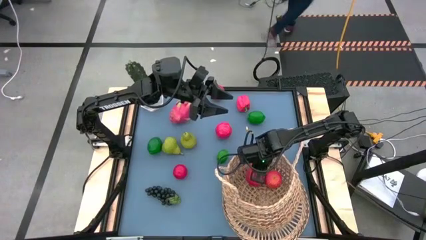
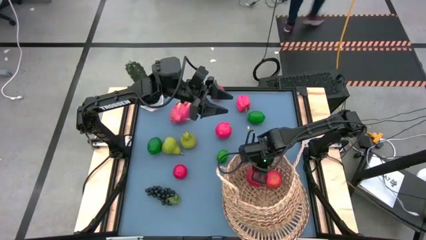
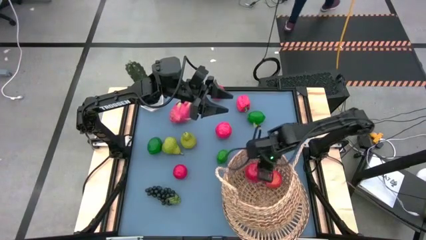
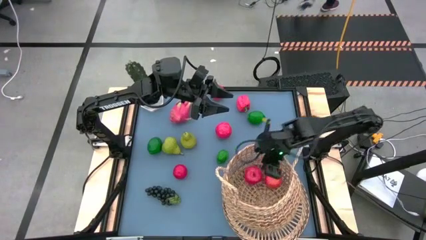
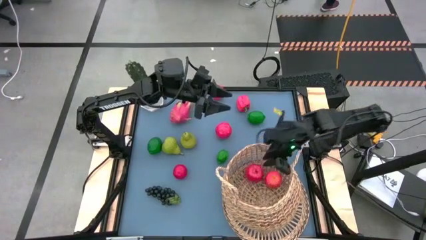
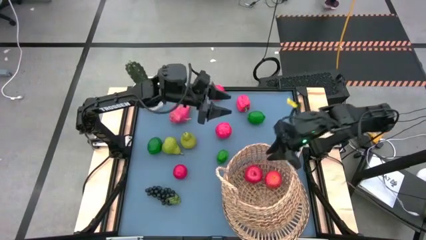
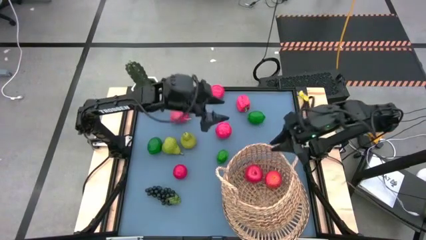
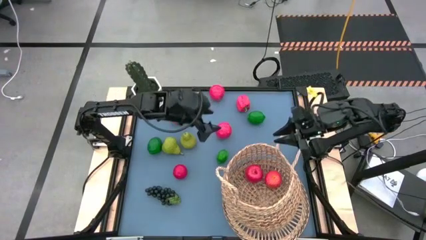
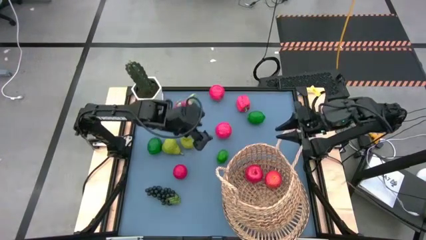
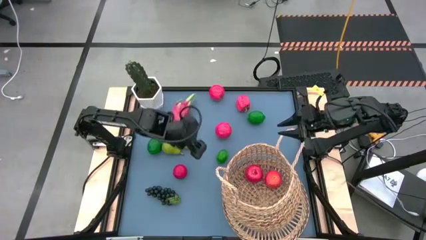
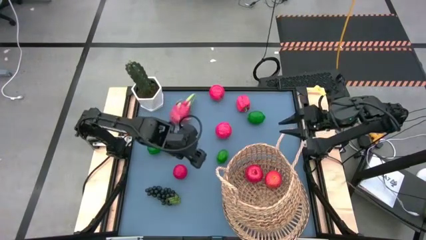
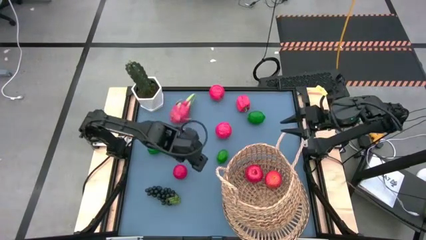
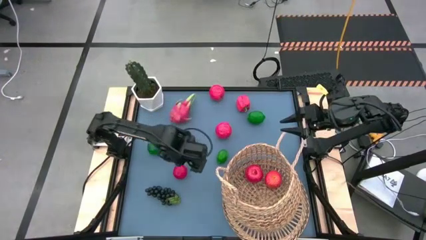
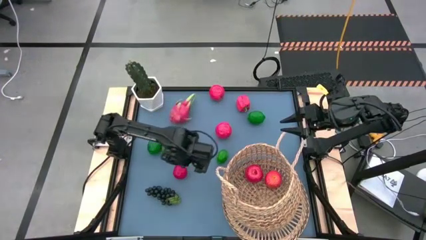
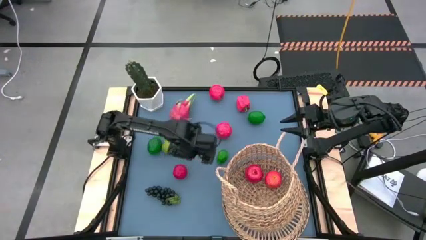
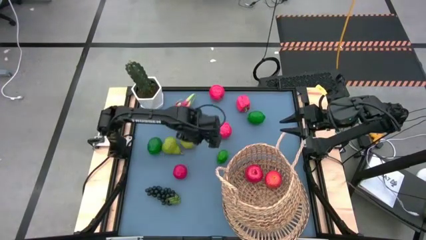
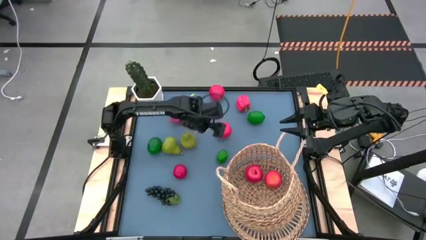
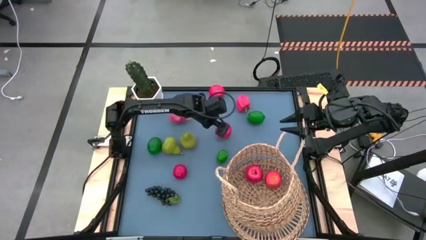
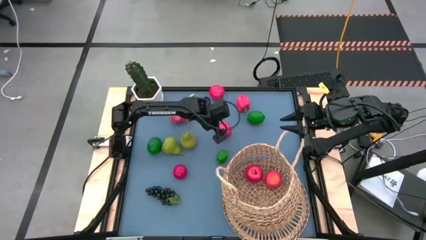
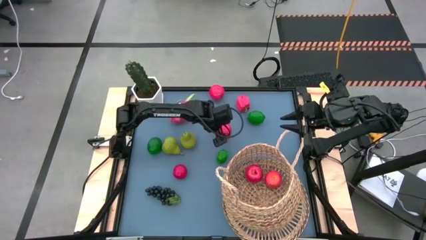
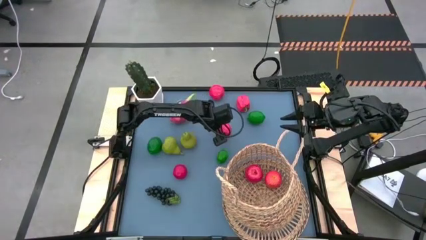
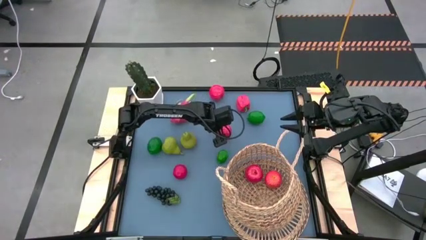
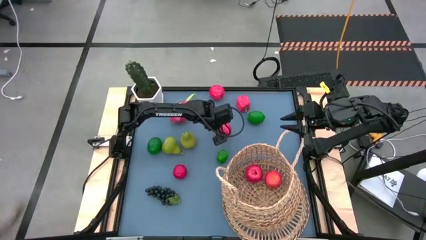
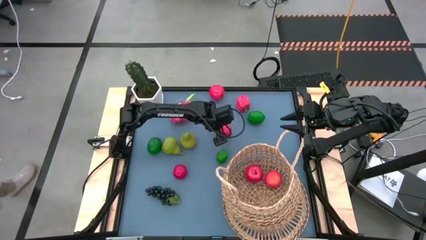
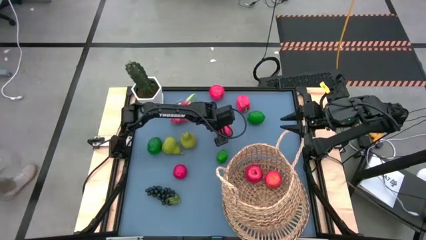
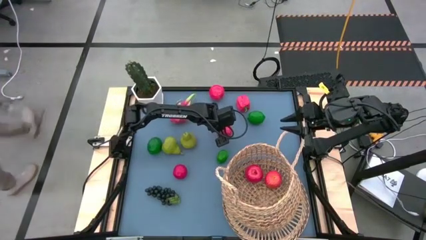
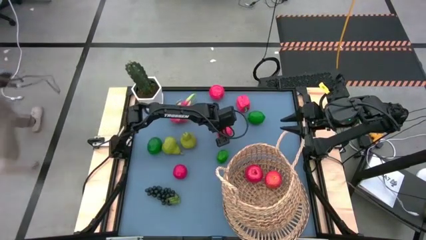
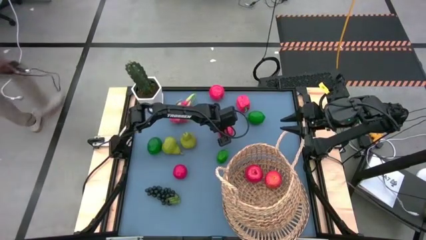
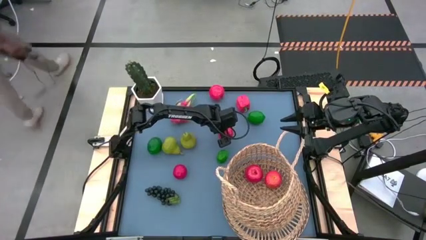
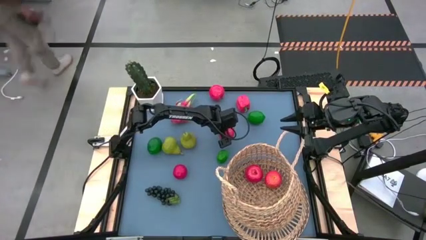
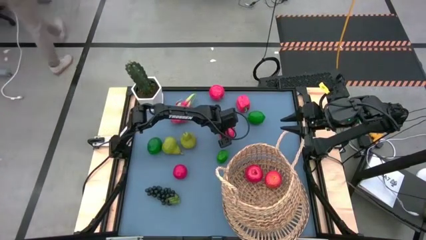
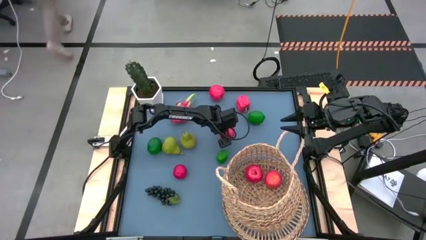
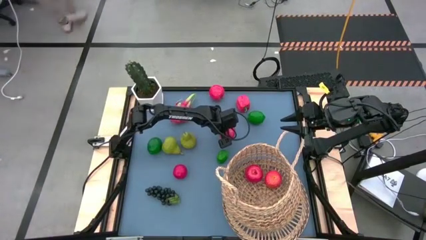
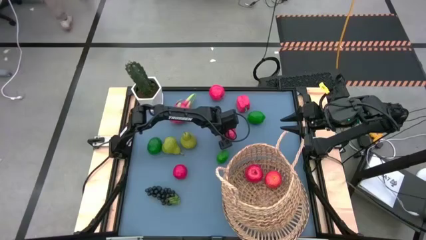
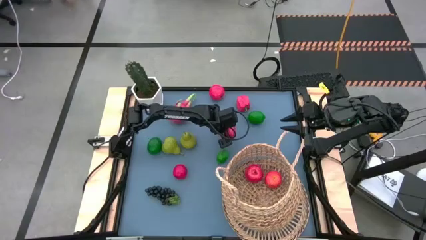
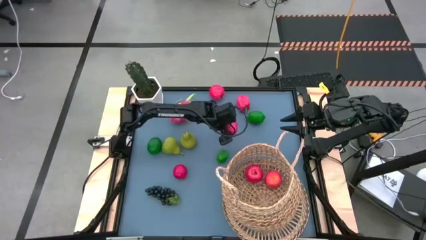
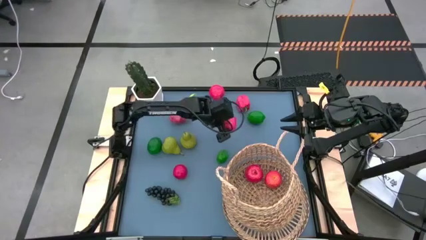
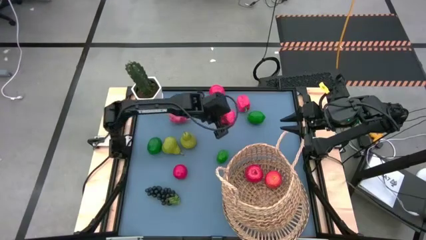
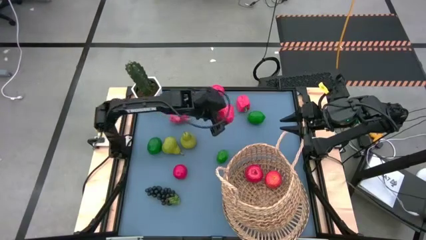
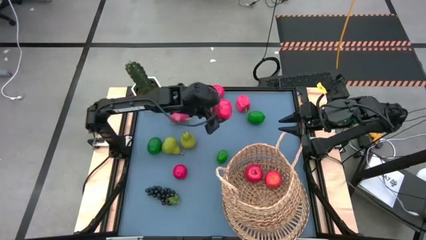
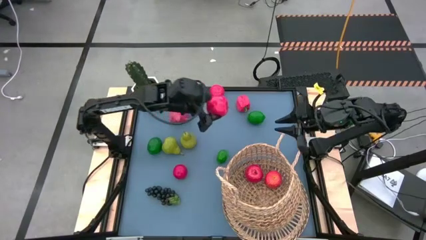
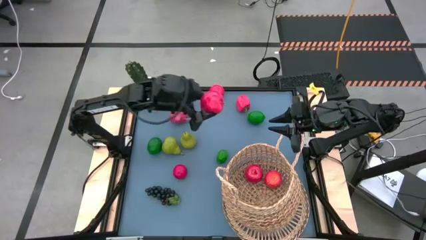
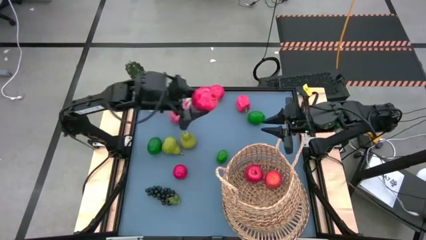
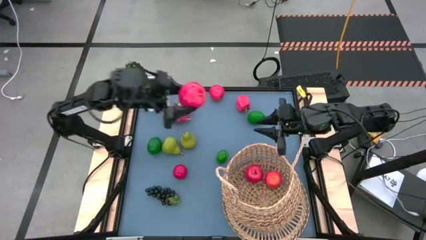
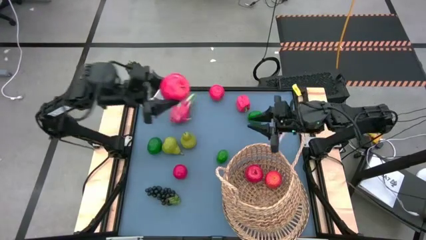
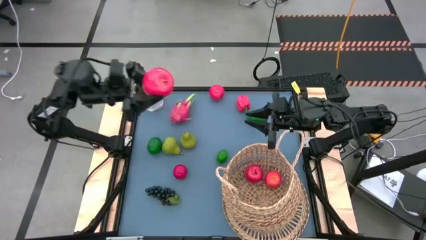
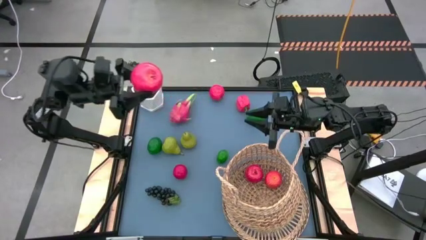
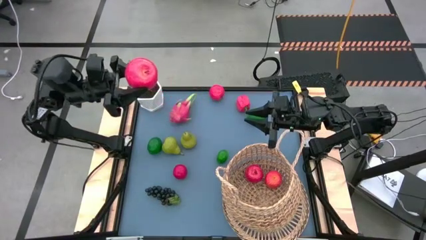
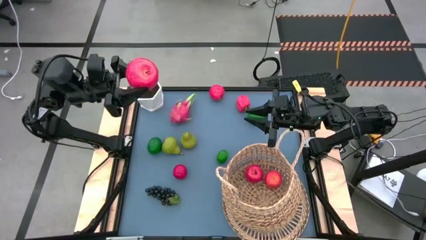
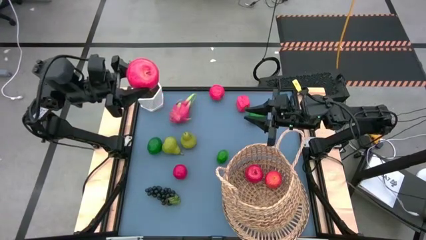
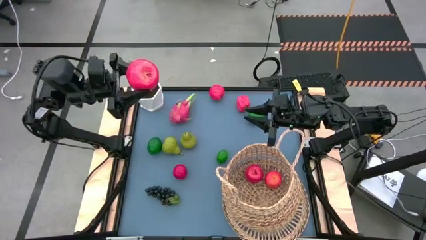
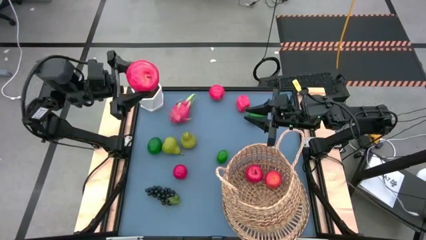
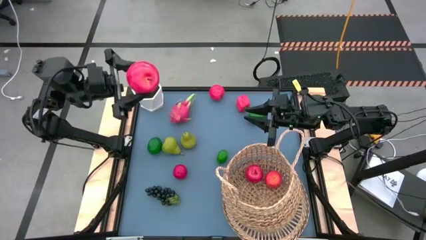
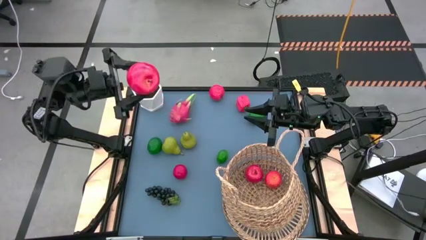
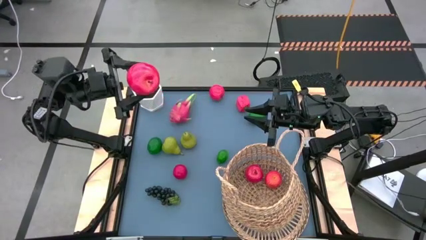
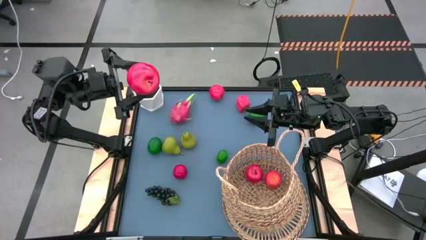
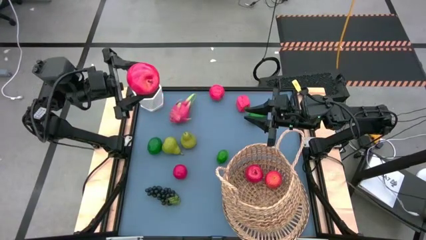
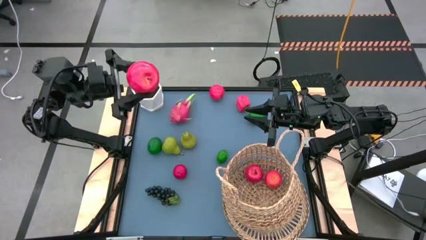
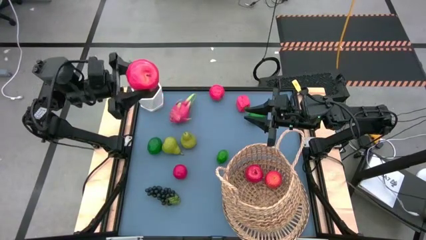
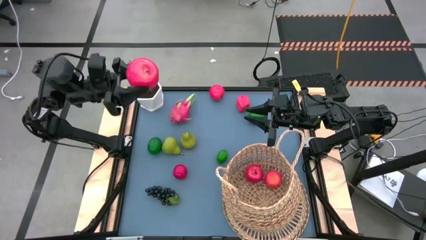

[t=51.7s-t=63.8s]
Task: Build produce basket
Put the red apple into the brown basket

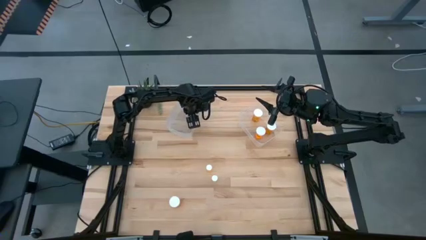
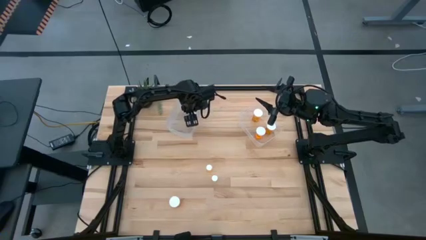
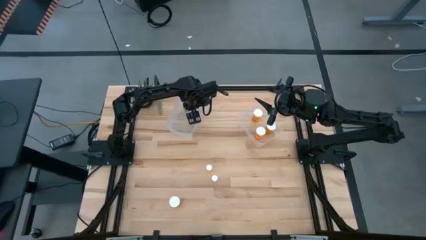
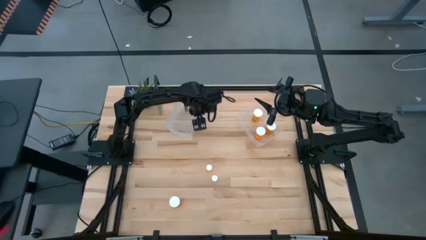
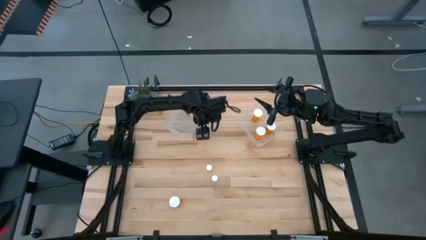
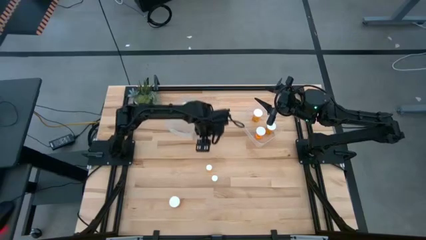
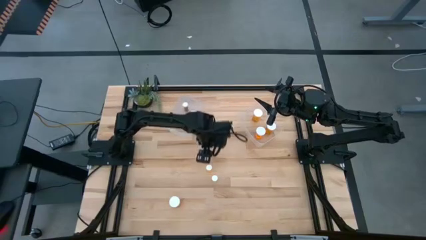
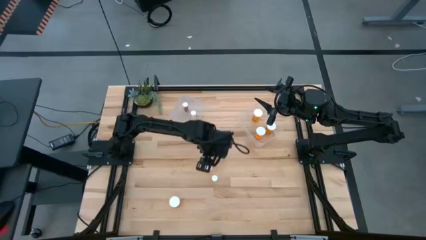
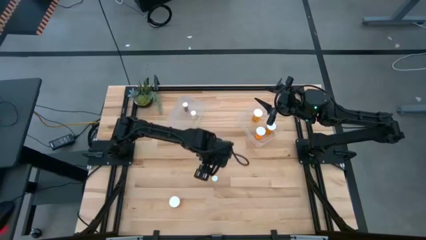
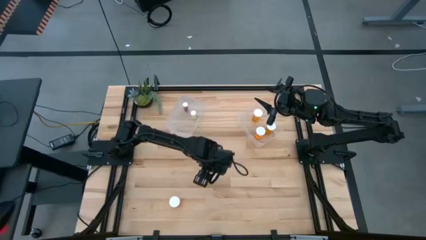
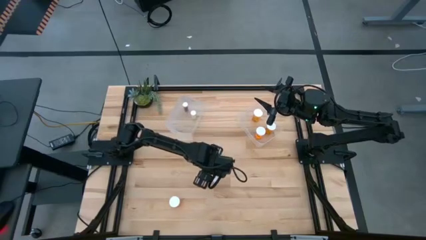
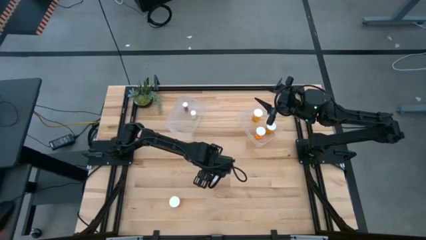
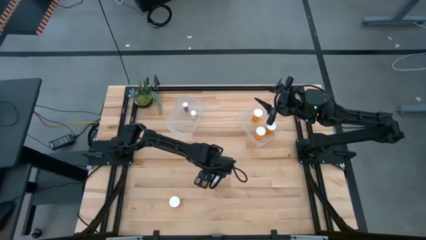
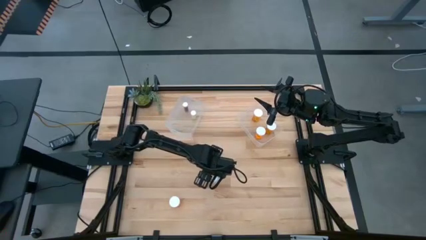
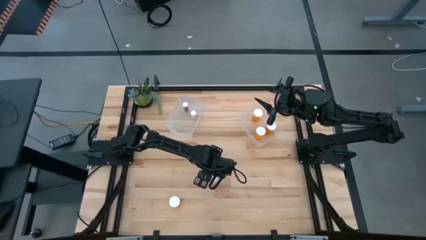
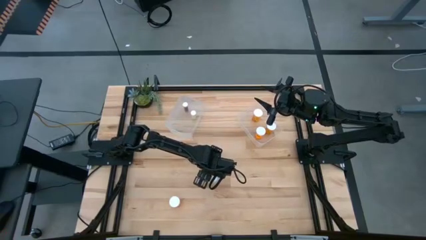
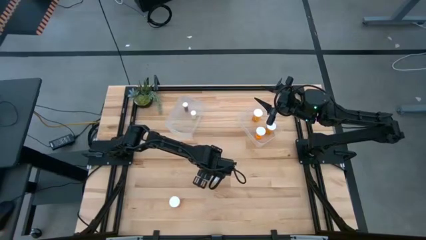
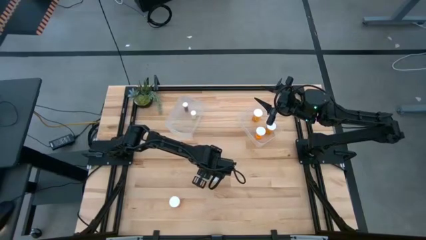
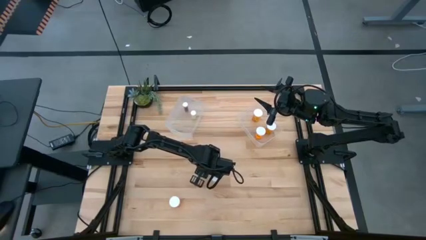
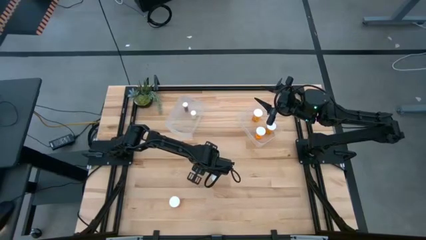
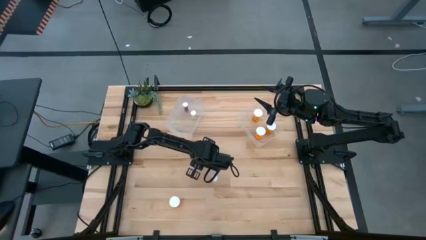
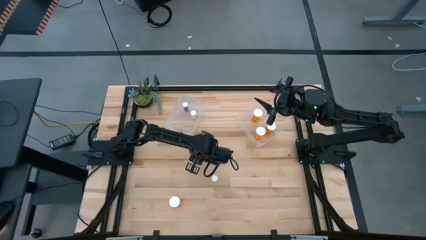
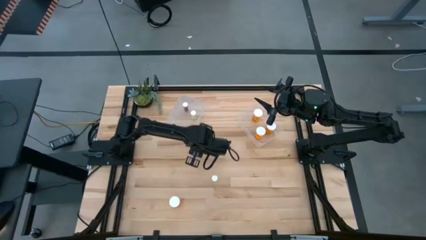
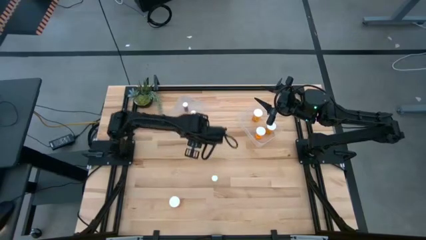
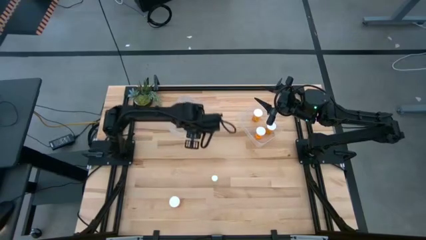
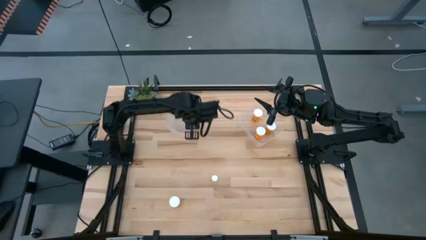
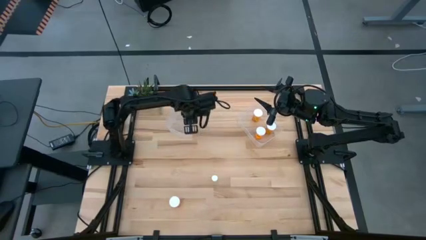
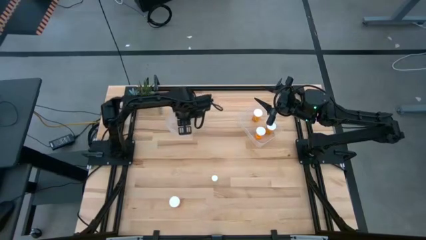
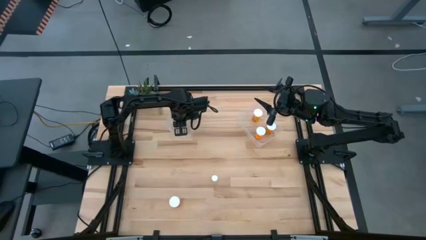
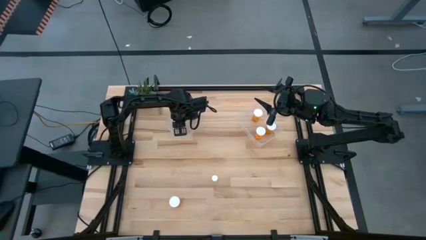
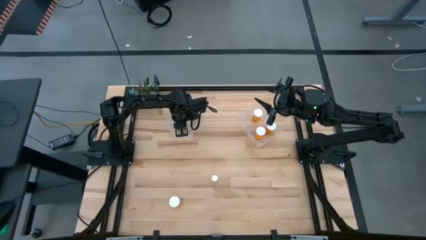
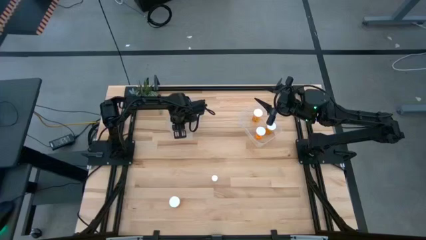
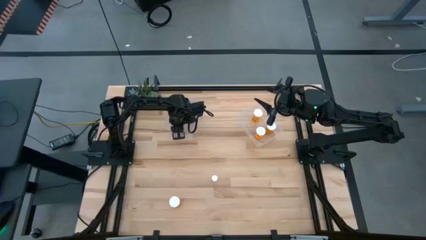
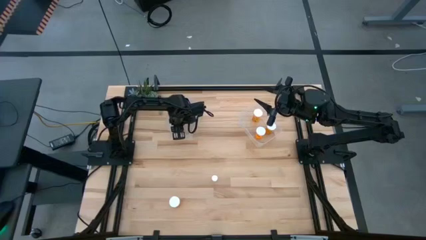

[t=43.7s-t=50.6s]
Task: Pick and place medicine bottles into bin by pill shape (circle, oval)
Put the small orange pill bottle into the left transparent bin
